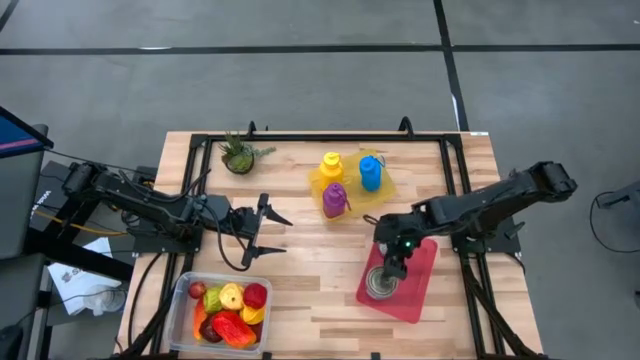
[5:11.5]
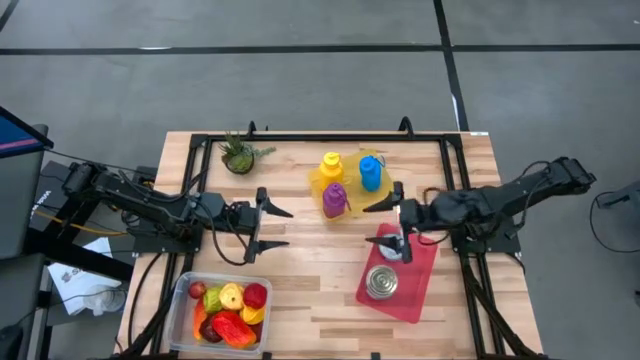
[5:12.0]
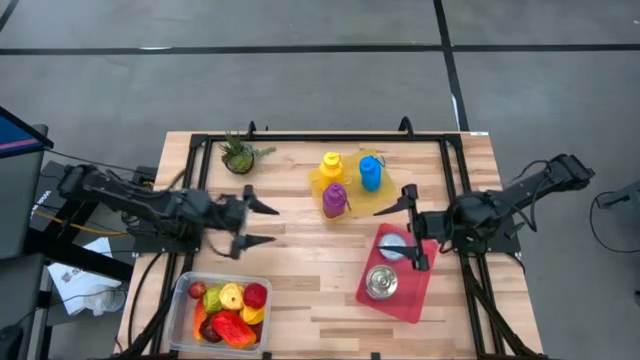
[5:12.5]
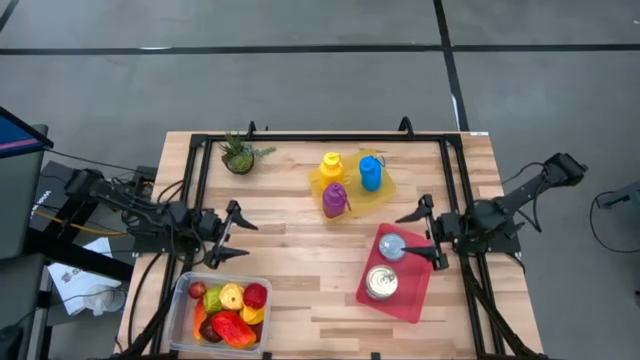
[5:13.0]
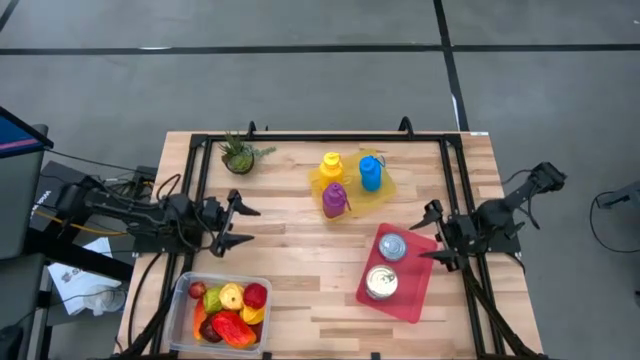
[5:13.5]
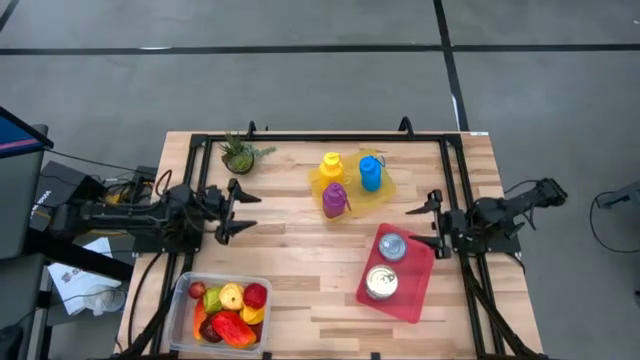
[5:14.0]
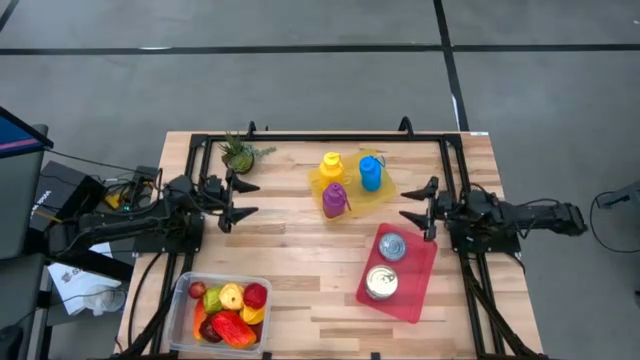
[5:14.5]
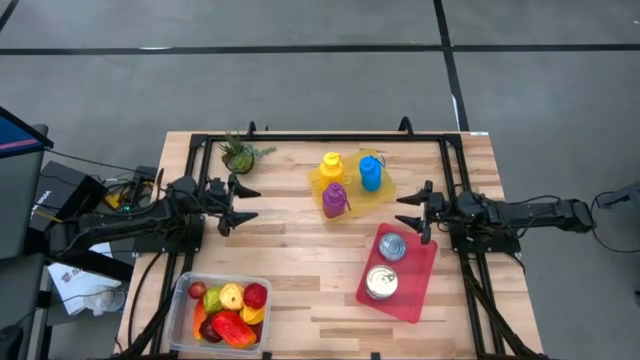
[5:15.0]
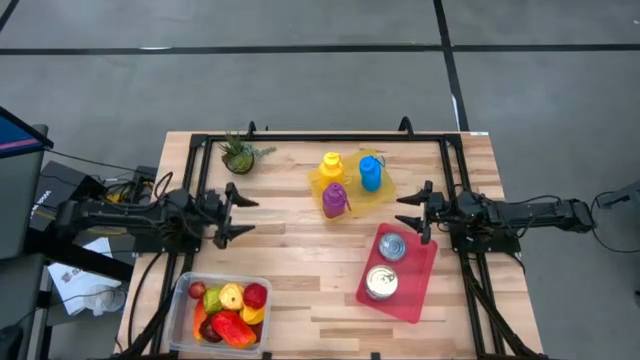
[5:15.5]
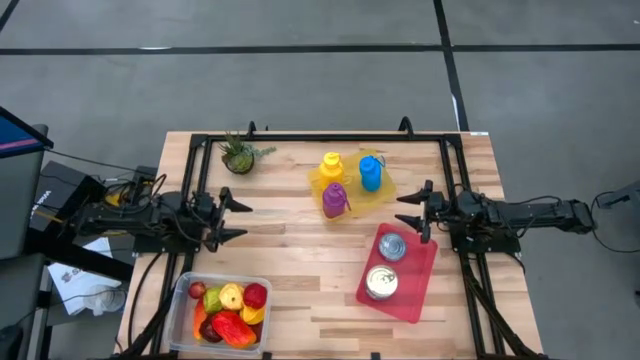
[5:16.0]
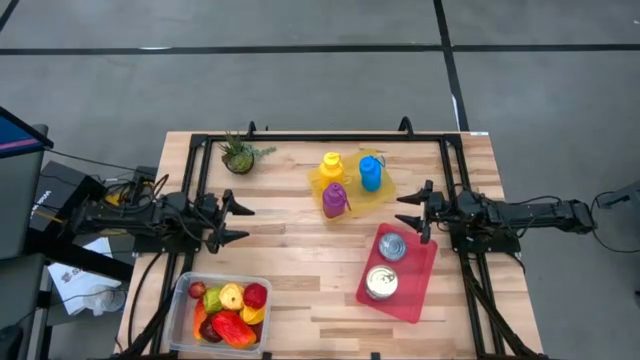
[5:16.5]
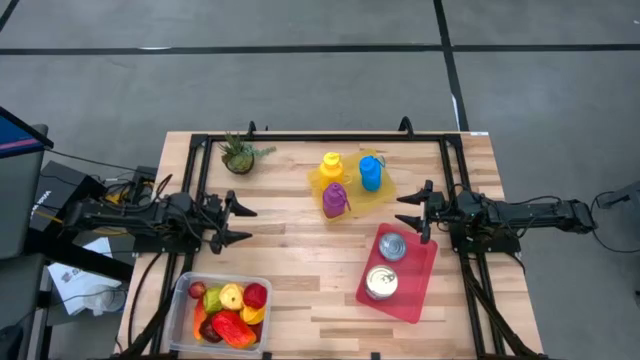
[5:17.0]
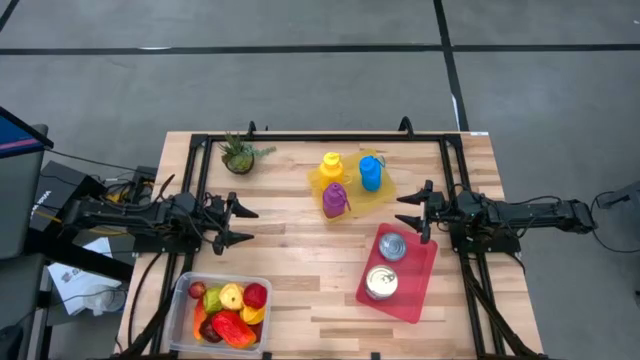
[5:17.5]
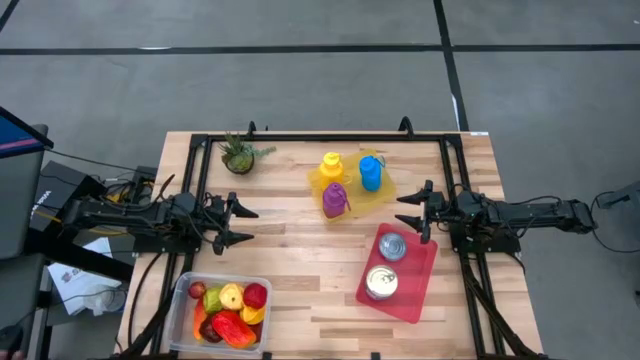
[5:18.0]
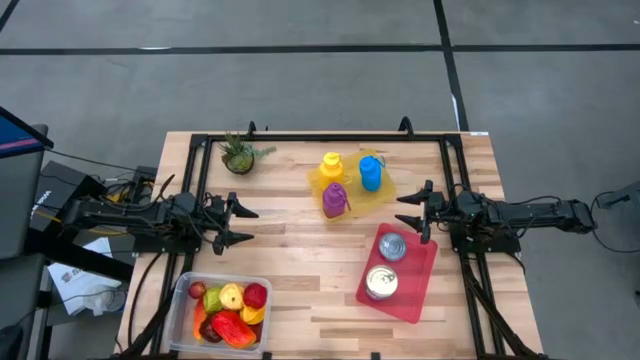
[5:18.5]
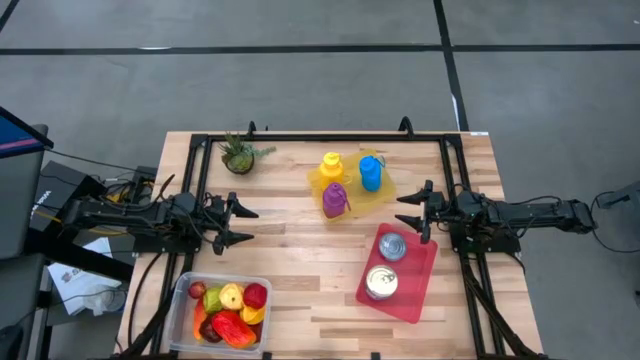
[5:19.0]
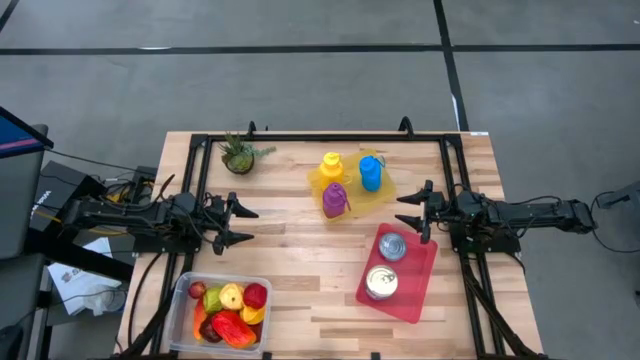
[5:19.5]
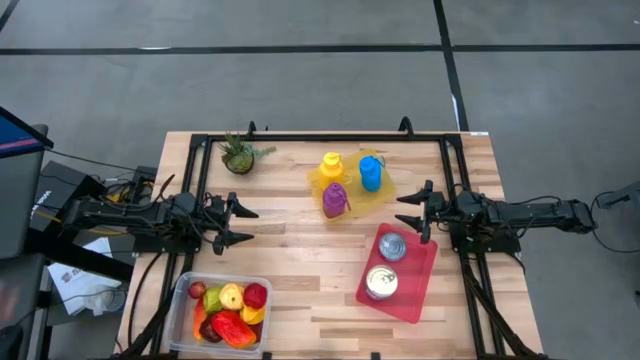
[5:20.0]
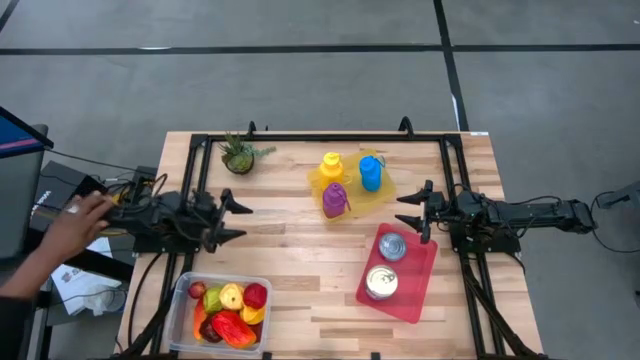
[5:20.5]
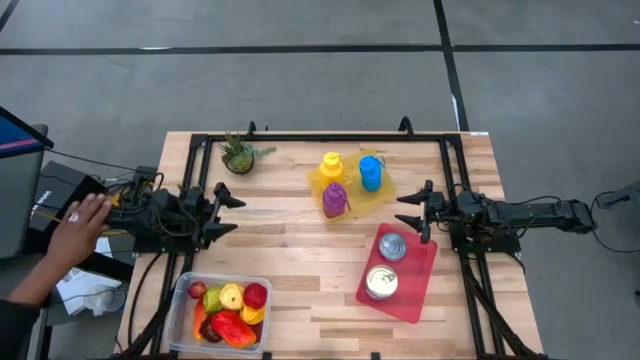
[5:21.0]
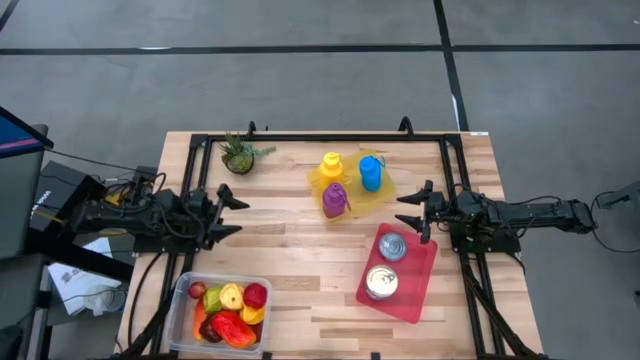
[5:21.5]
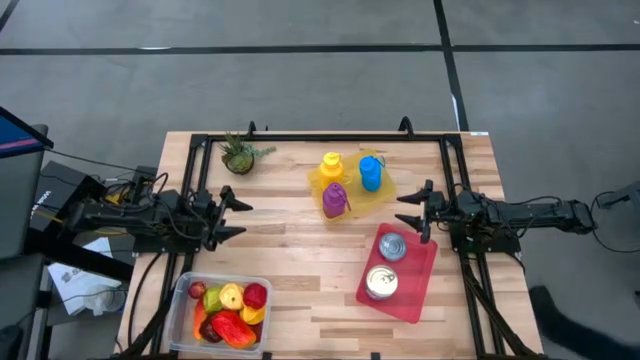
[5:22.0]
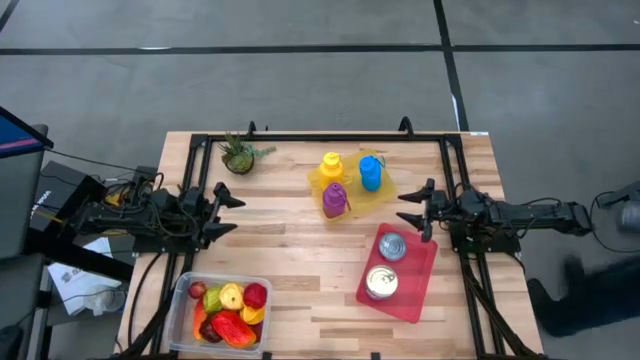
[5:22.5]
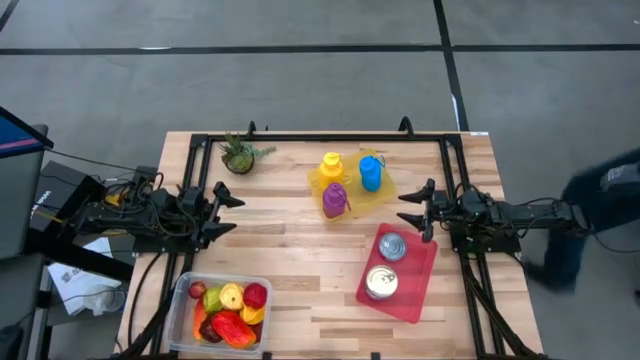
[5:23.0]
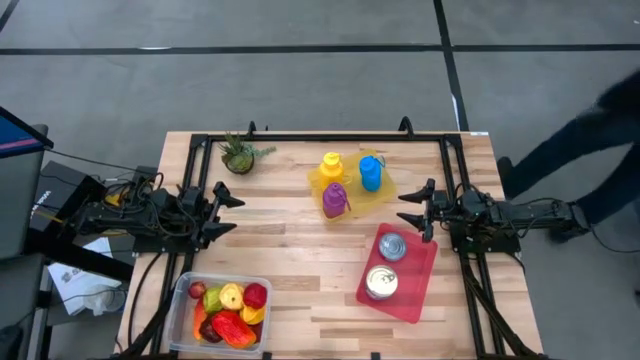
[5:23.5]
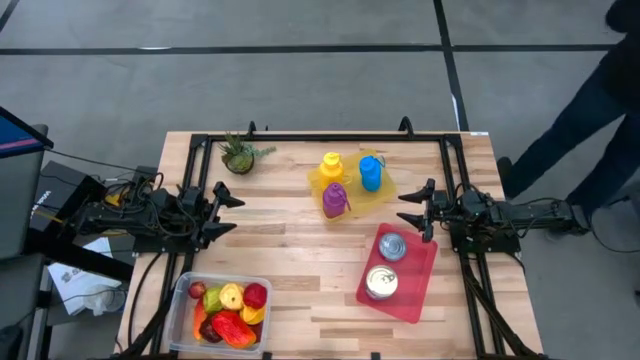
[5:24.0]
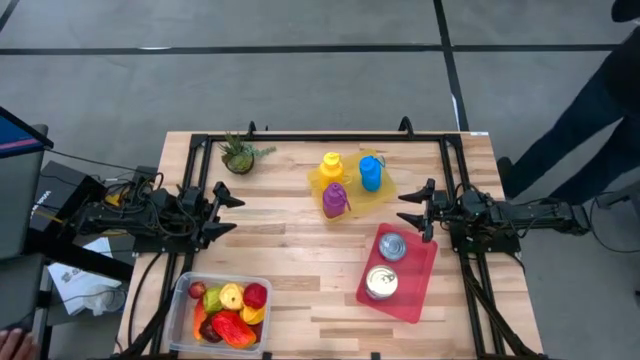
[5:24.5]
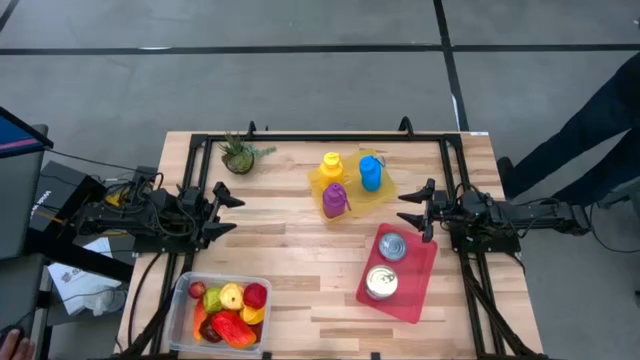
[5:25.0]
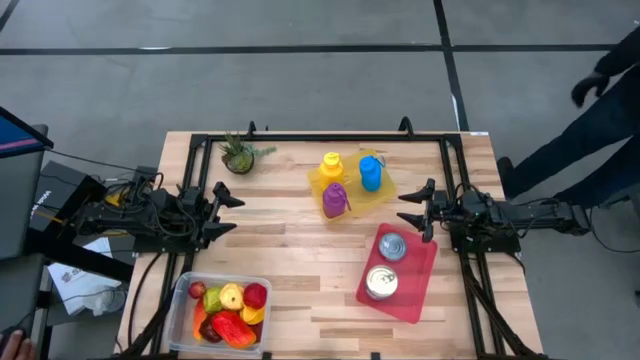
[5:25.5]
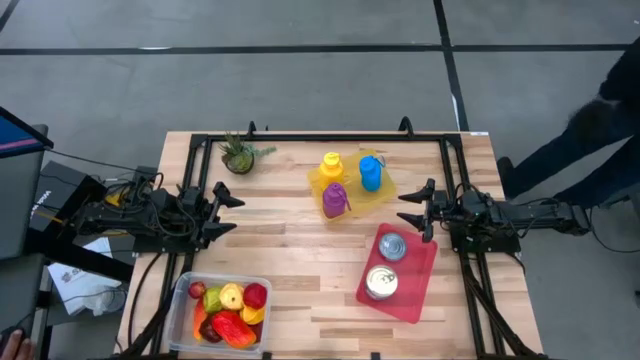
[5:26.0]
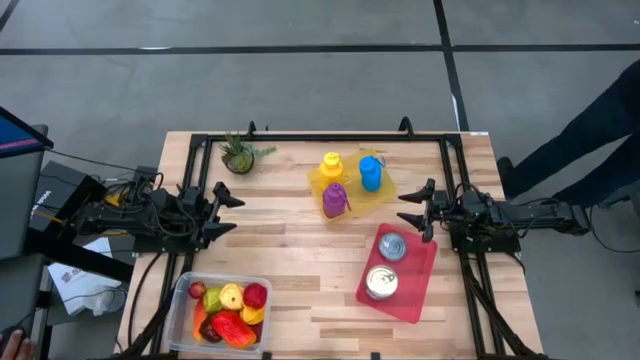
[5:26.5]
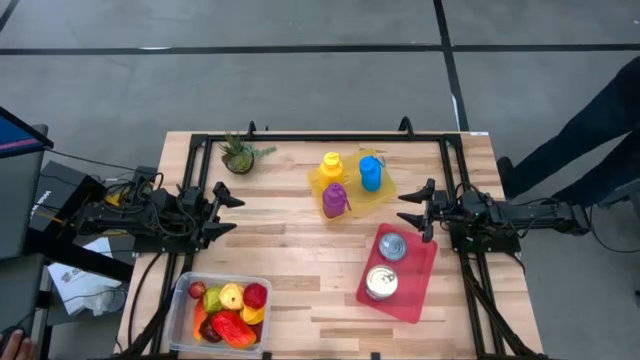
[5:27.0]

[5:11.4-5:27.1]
Task: Pick & Place Food Item
Return to Home Position

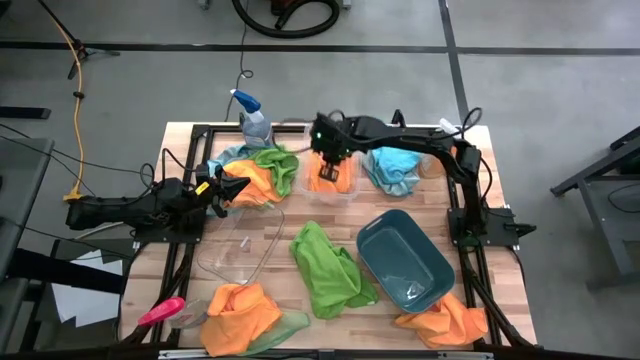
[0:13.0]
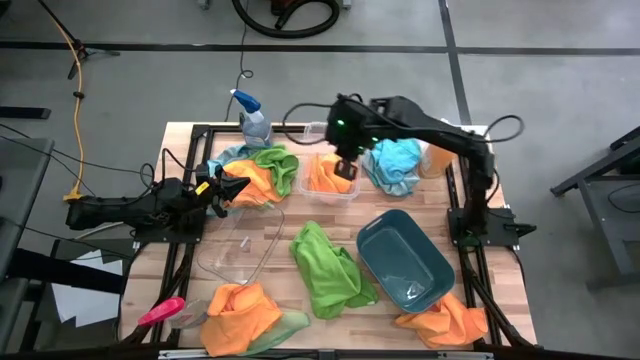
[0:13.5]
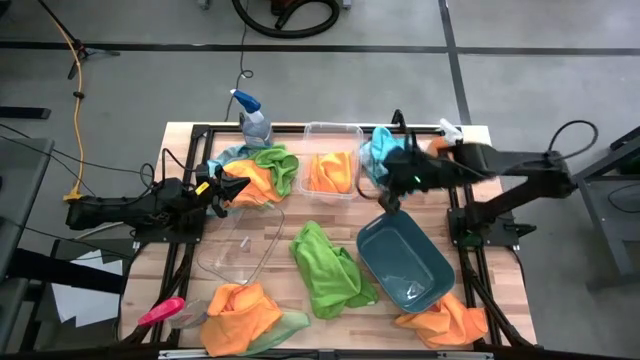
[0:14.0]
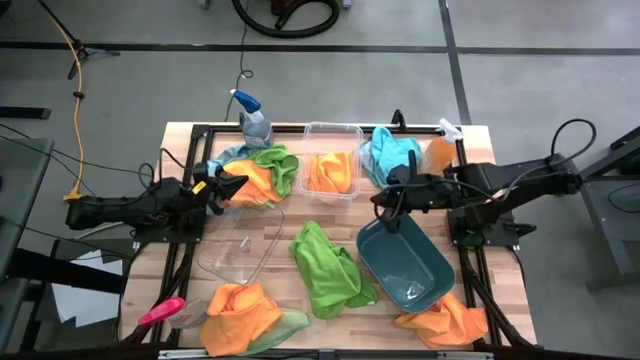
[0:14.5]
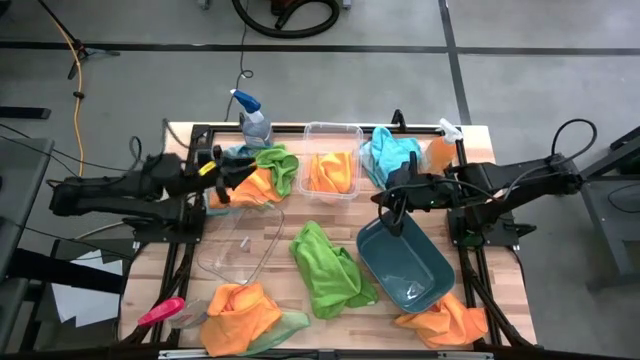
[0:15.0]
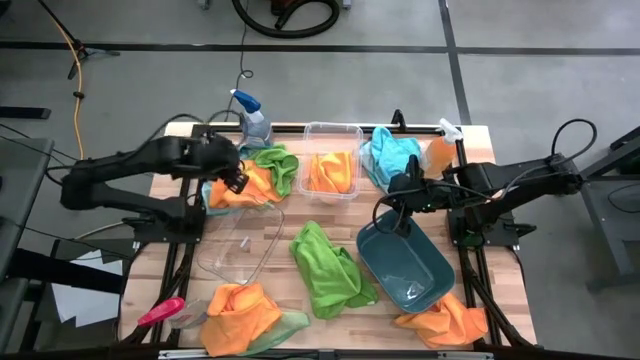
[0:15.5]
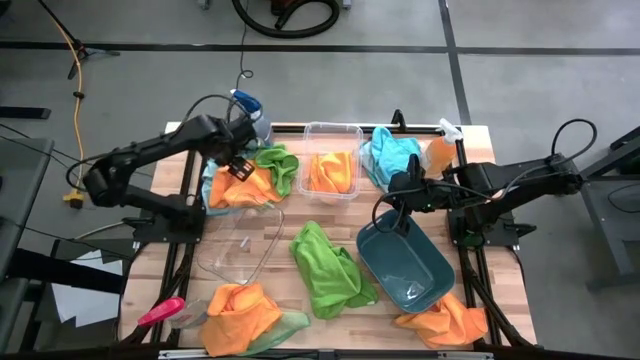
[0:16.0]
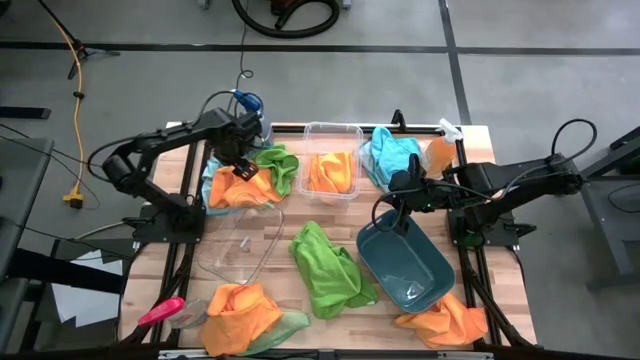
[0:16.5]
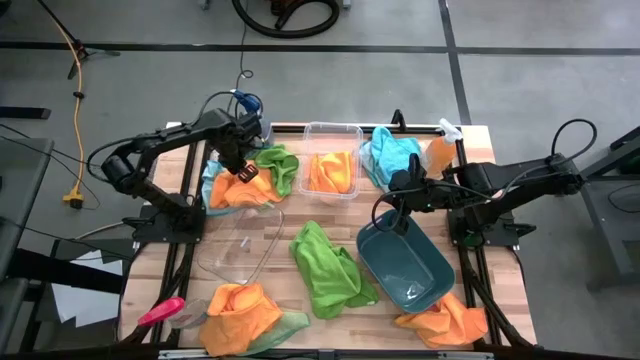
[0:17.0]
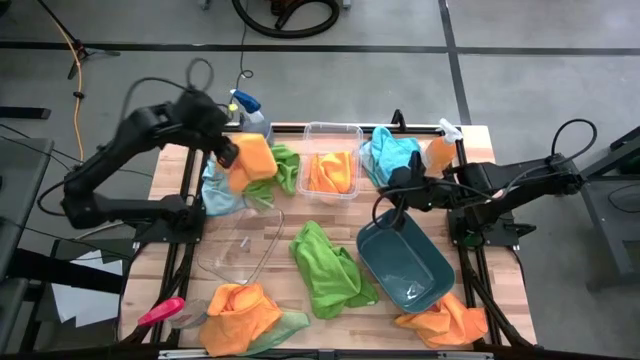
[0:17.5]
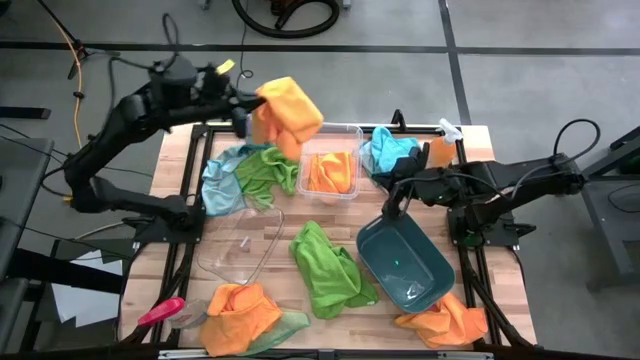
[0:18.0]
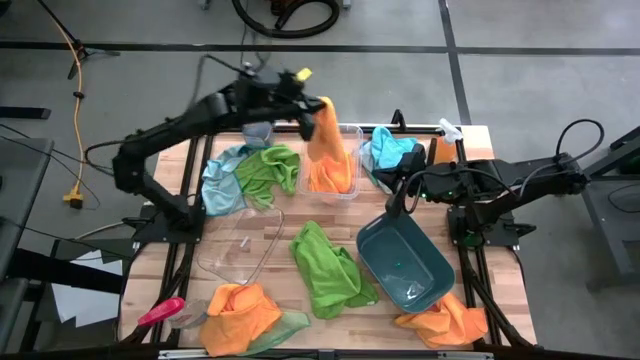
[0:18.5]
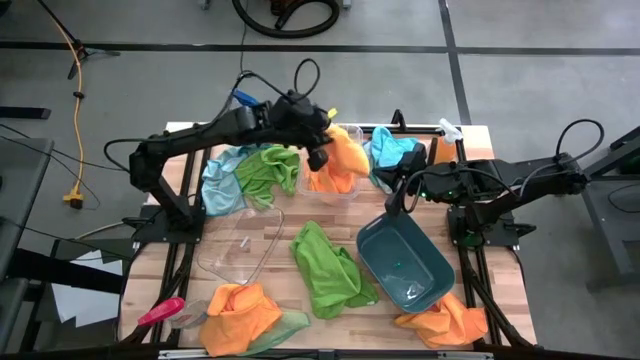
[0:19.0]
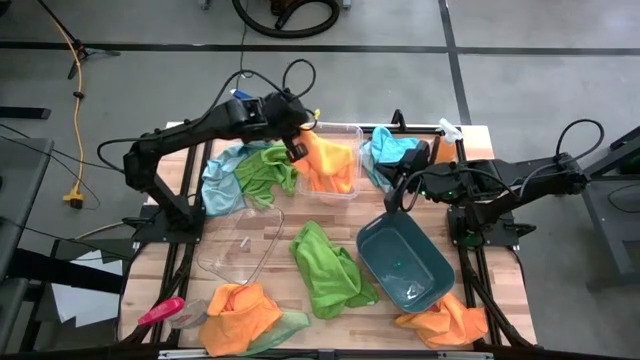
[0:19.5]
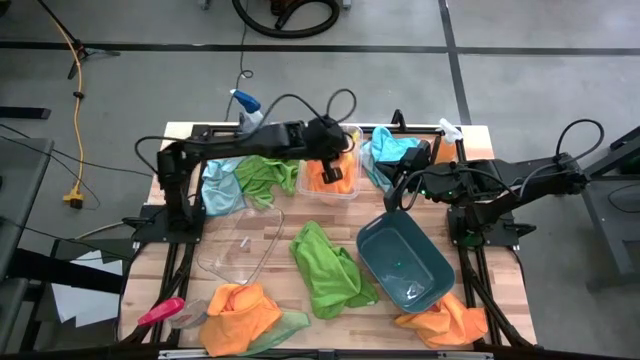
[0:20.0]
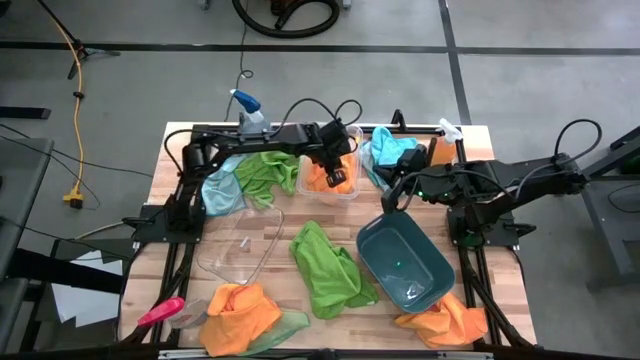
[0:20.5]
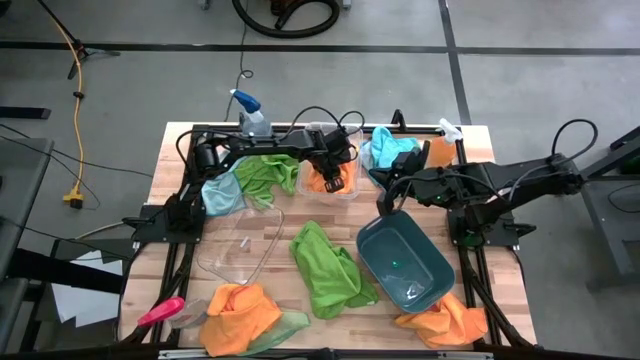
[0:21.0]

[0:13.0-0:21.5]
Task: Sort microfiber towel by color & place in baskets
Put the microfiber towel into the top transparent bin
